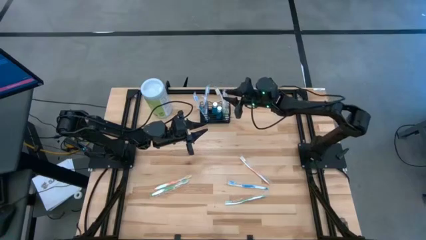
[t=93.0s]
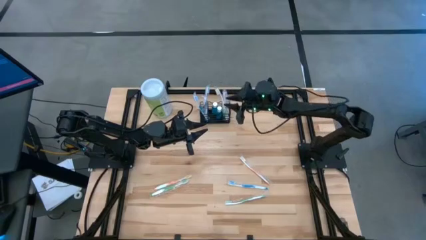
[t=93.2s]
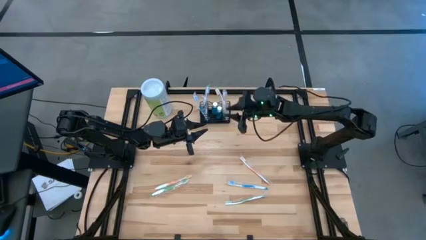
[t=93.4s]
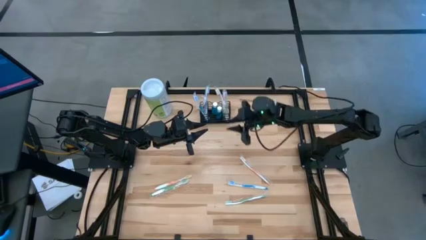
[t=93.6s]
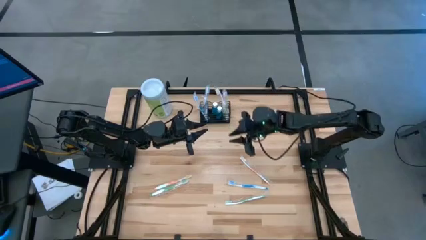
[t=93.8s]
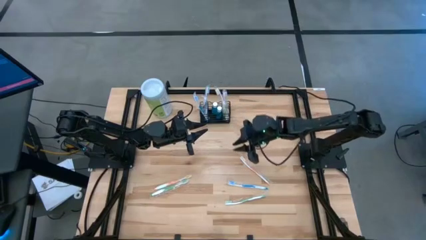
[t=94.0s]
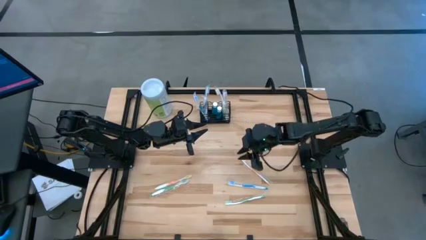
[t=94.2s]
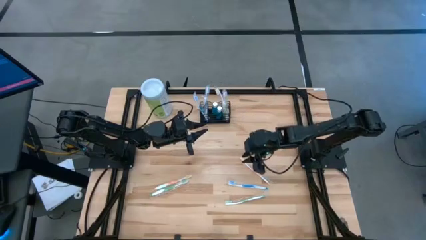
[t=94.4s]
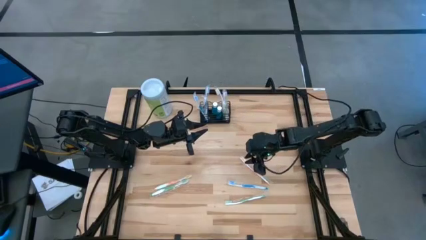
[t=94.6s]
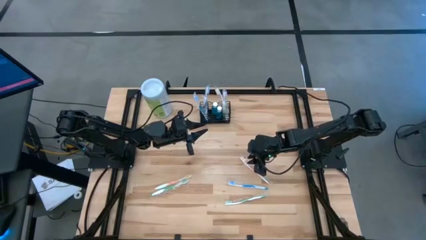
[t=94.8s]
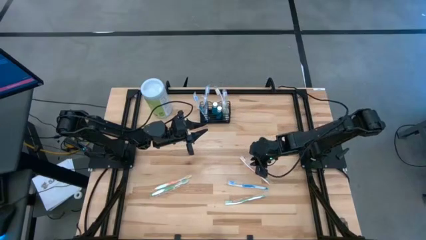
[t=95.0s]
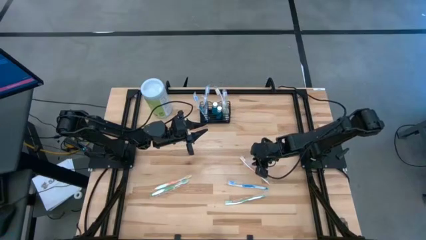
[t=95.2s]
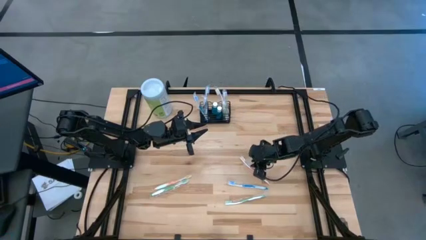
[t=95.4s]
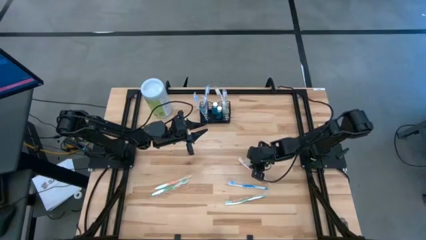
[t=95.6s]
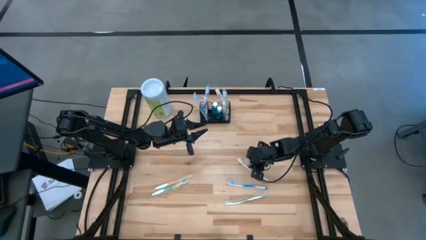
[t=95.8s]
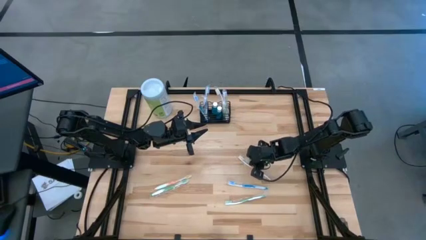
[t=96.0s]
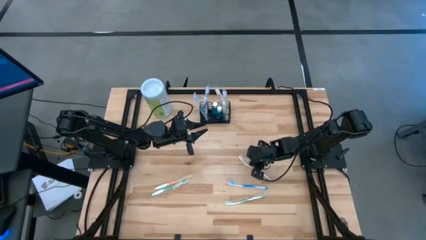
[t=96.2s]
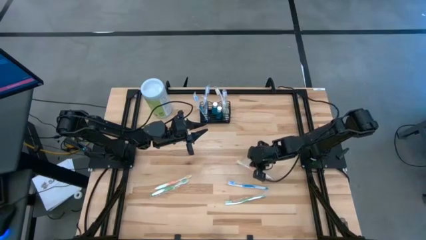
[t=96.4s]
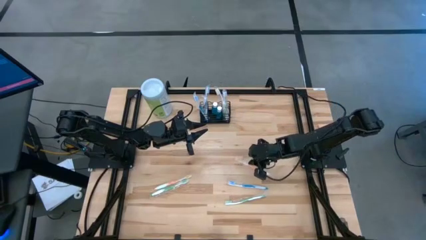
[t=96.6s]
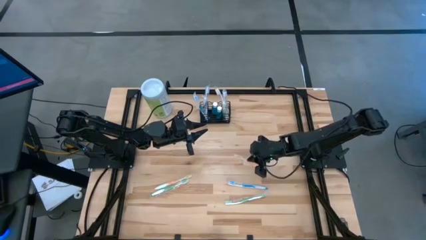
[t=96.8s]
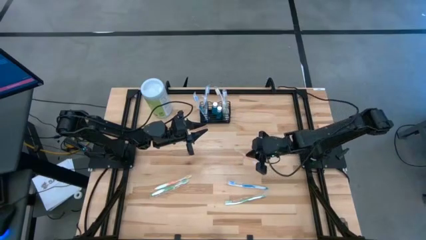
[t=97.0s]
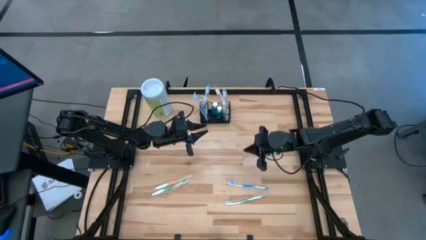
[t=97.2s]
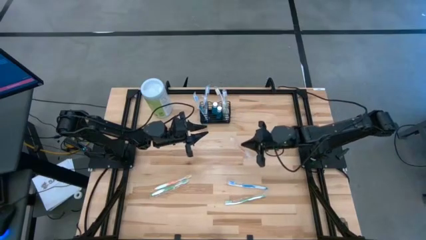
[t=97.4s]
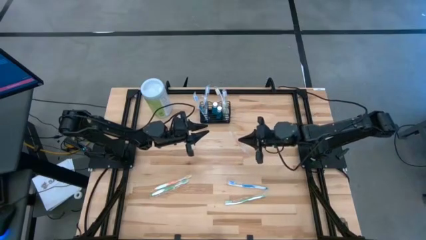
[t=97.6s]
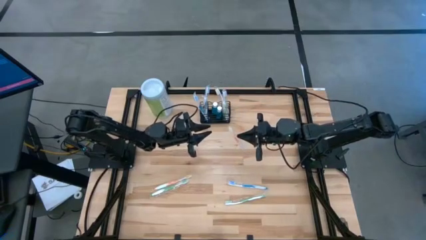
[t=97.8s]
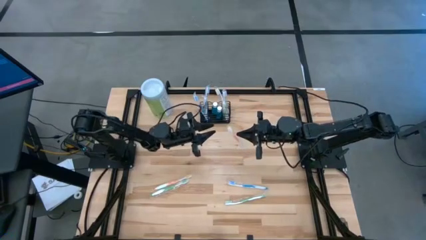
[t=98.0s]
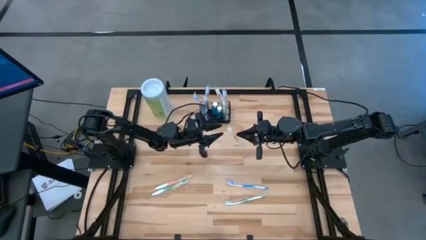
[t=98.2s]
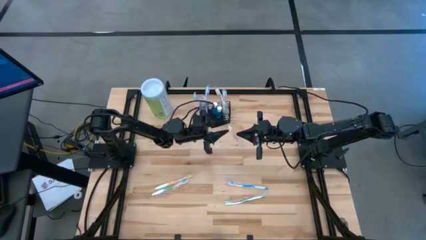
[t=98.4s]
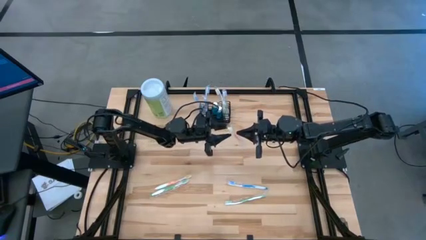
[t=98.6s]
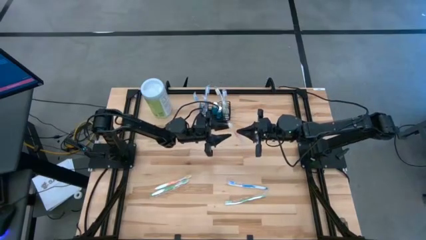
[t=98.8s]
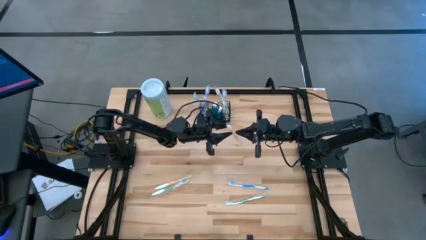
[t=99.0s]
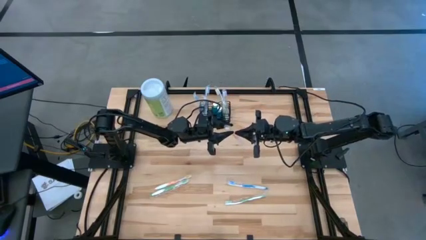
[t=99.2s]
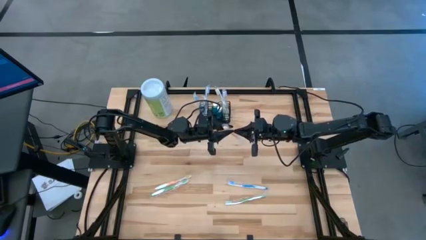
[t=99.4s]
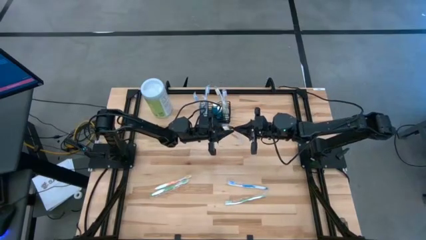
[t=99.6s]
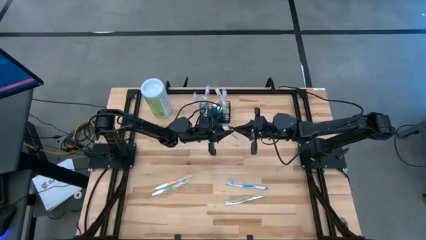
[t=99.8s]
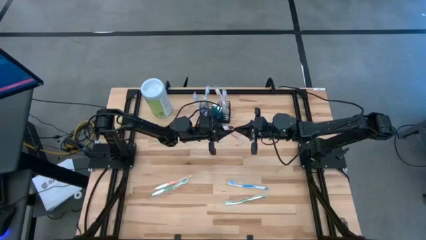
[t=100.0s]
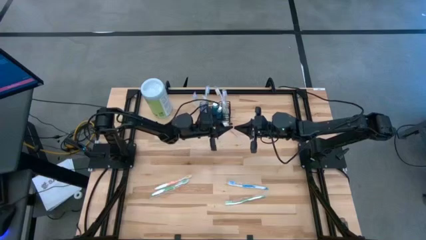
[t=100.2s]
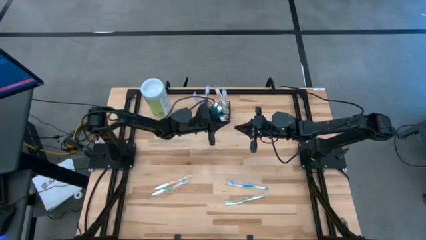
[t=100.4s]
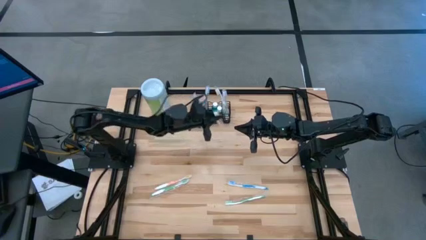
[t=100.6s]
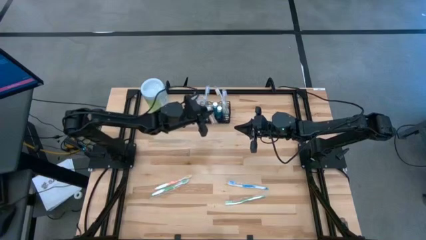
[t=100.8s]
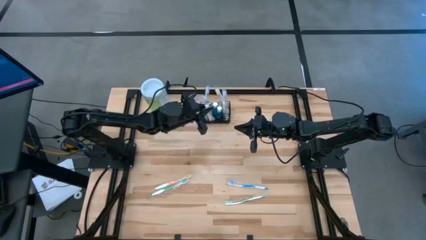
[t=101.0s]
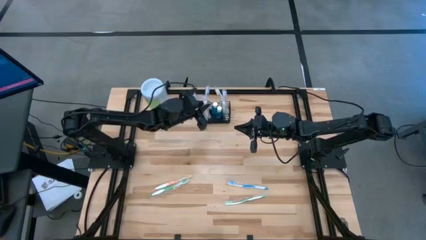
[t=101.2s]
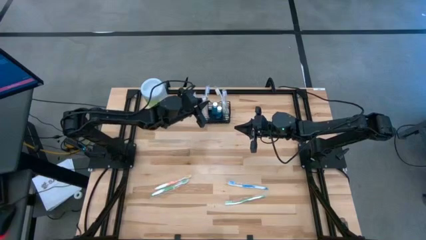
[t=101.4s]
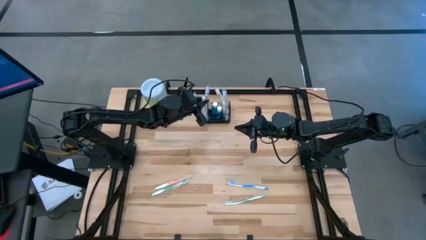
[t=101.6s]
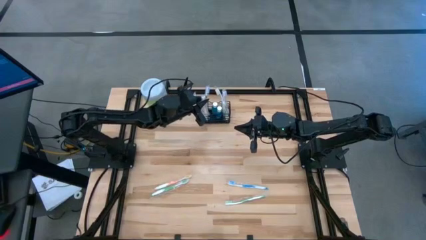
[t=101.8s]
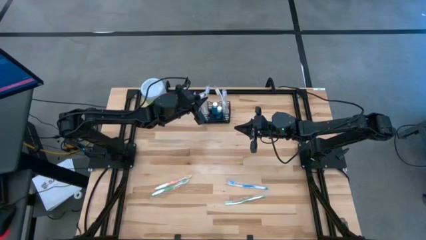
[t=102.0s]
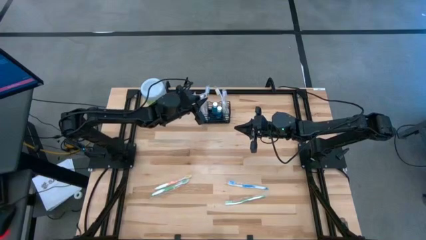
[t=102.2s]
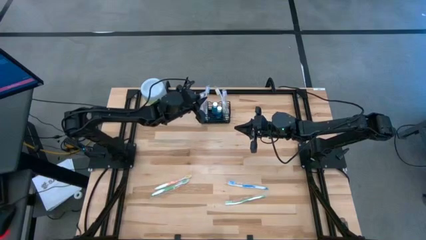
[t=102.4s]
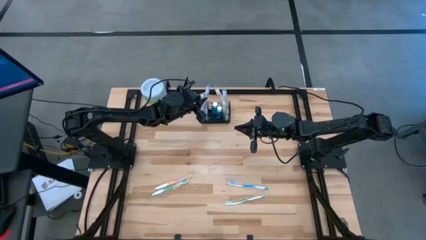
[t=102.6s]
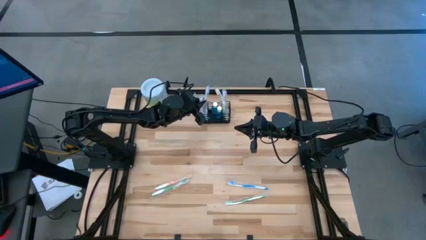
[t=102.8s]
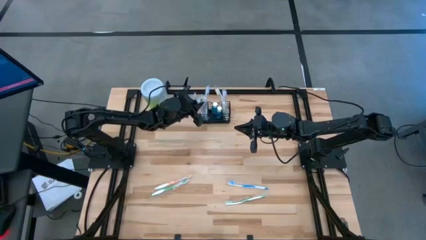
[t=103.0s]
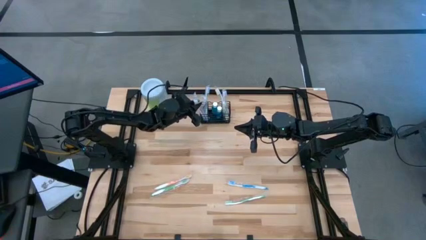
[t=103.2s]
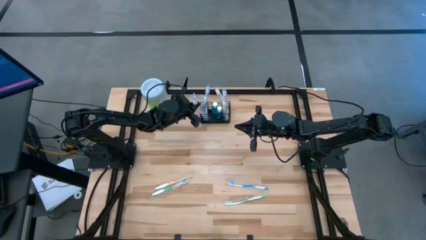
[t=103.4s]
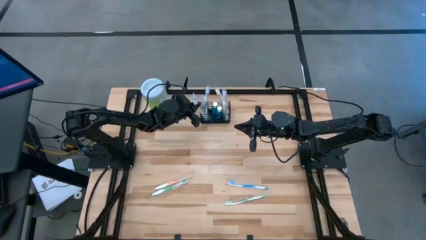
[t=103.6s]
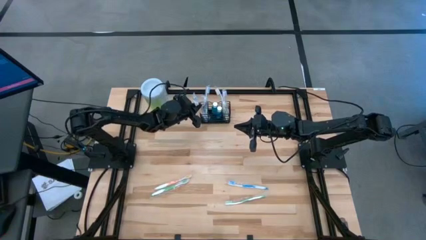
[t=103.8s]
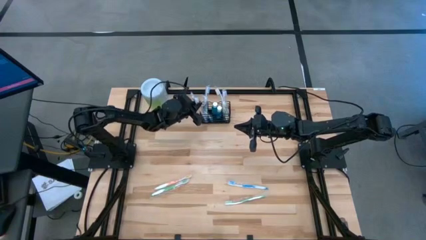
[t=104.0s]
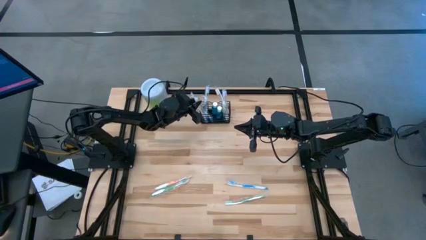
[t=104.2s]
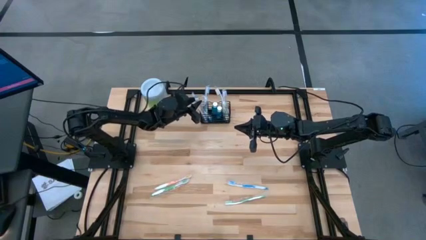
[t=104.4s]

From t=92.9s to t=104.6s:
Task: Pick & Place toothbrushing station
Put the orange toothbrush into the black wire organizer
